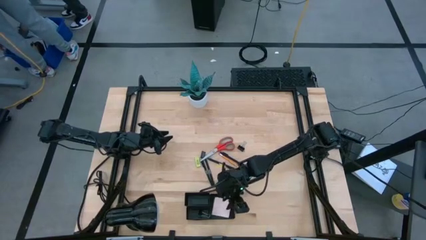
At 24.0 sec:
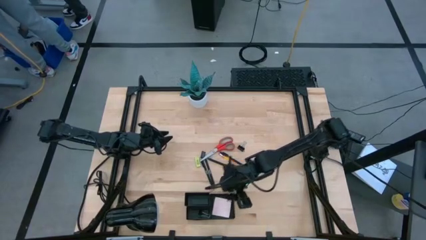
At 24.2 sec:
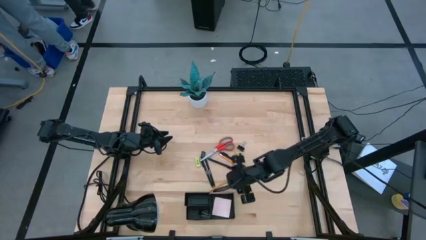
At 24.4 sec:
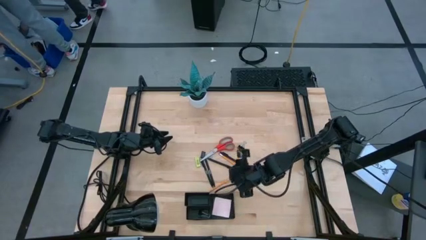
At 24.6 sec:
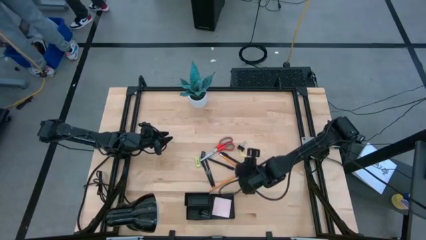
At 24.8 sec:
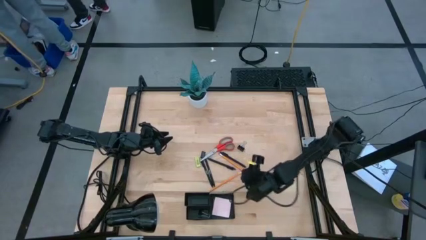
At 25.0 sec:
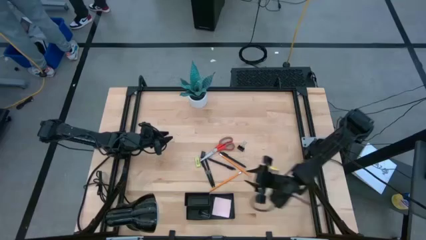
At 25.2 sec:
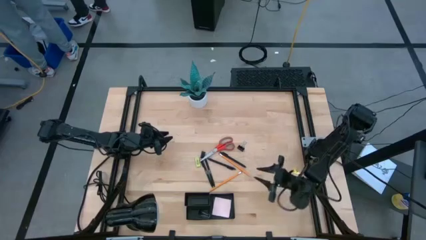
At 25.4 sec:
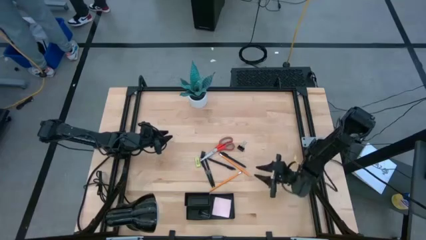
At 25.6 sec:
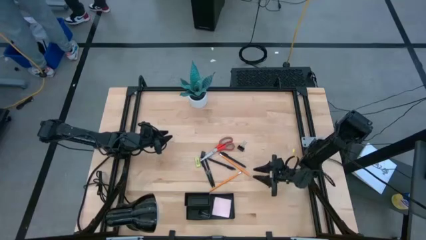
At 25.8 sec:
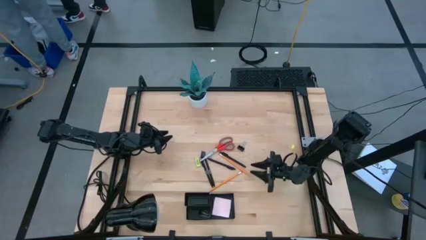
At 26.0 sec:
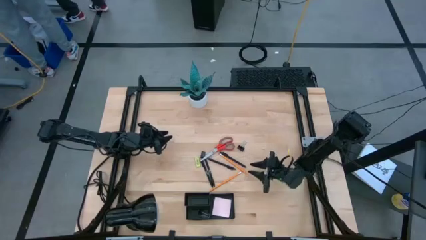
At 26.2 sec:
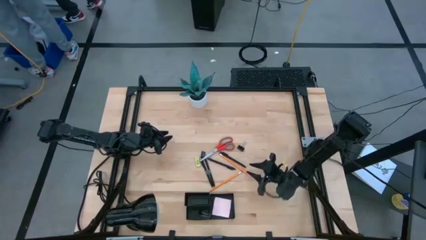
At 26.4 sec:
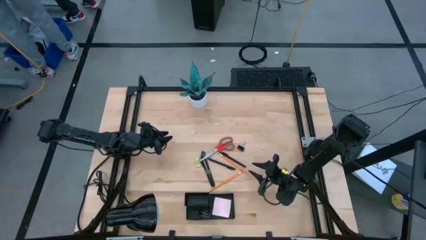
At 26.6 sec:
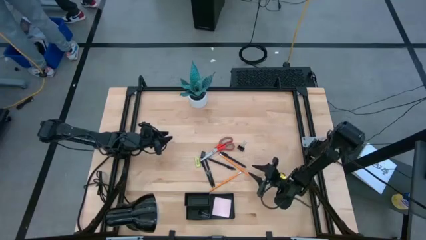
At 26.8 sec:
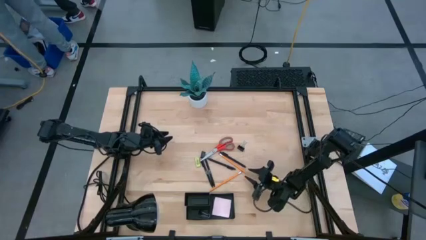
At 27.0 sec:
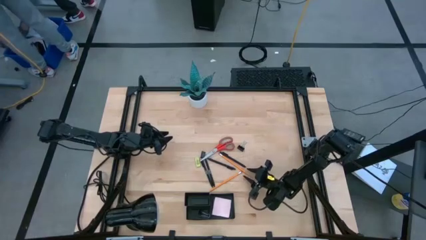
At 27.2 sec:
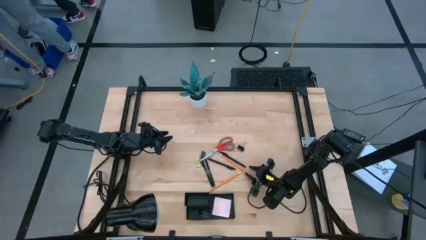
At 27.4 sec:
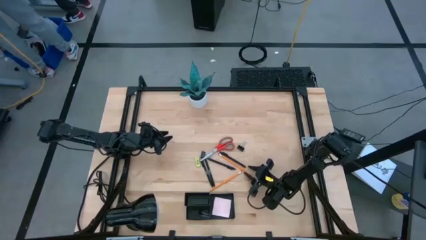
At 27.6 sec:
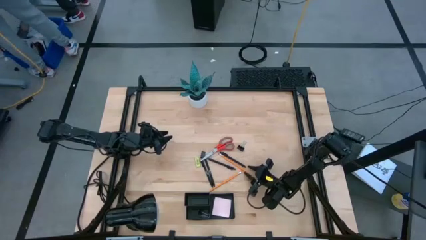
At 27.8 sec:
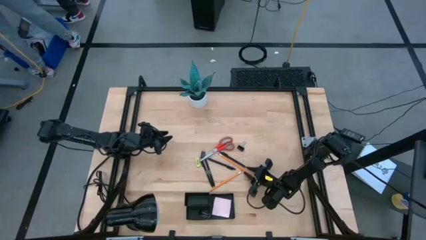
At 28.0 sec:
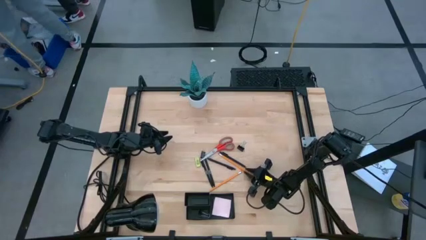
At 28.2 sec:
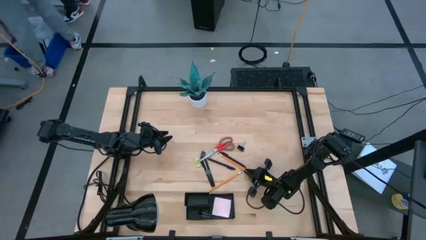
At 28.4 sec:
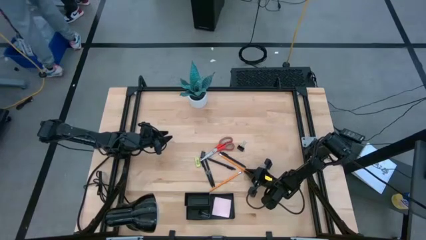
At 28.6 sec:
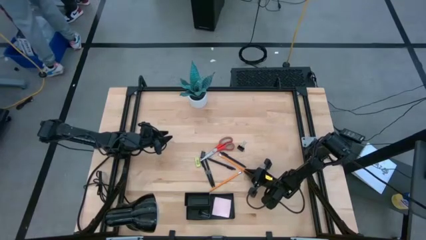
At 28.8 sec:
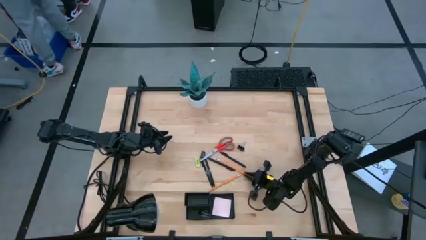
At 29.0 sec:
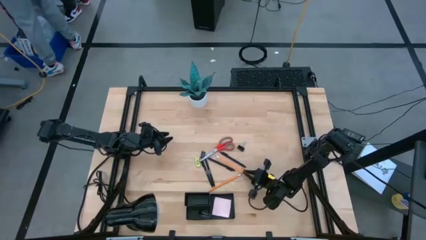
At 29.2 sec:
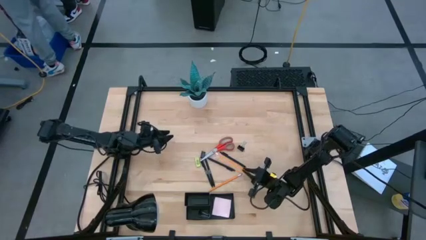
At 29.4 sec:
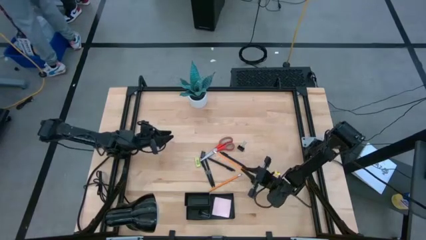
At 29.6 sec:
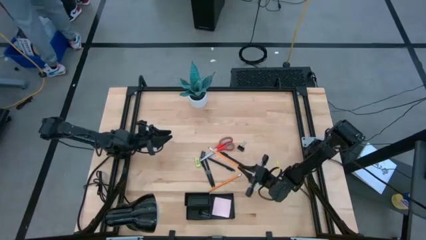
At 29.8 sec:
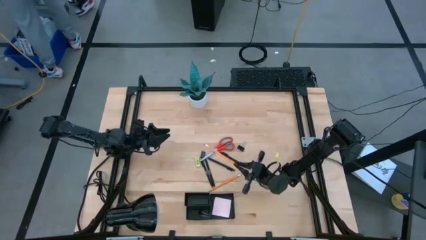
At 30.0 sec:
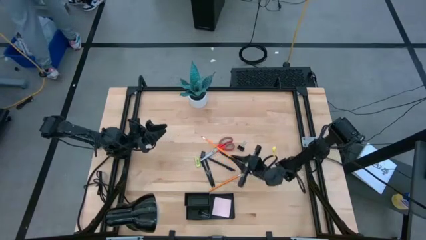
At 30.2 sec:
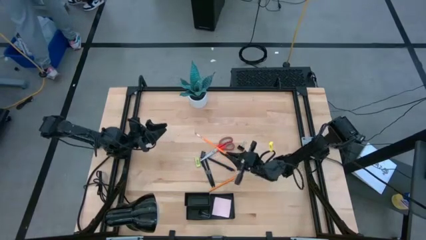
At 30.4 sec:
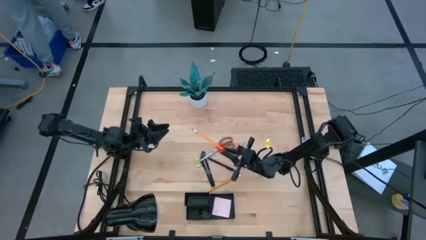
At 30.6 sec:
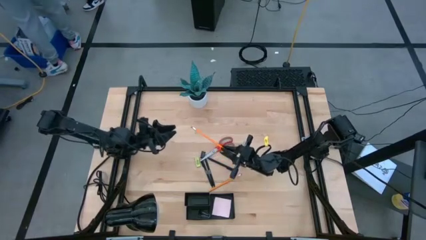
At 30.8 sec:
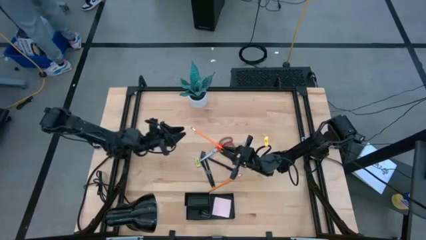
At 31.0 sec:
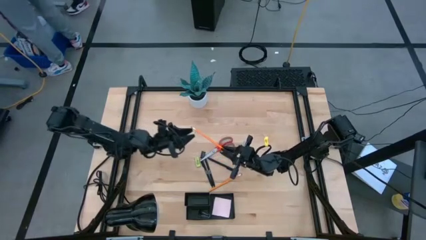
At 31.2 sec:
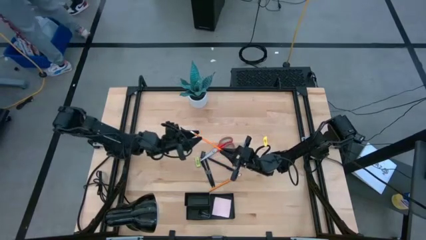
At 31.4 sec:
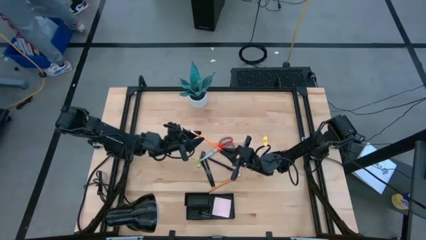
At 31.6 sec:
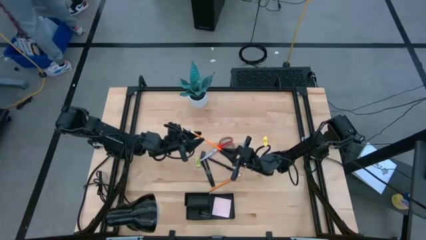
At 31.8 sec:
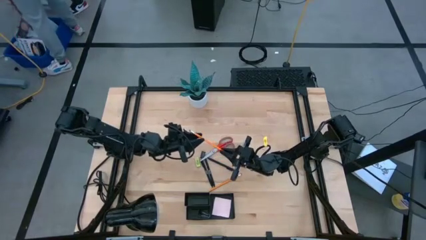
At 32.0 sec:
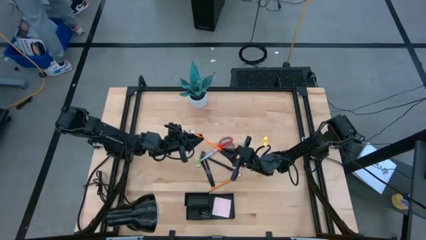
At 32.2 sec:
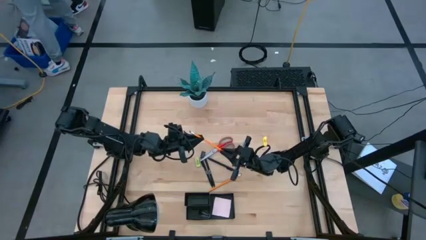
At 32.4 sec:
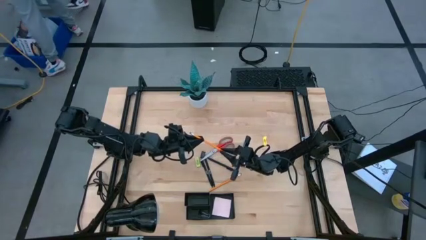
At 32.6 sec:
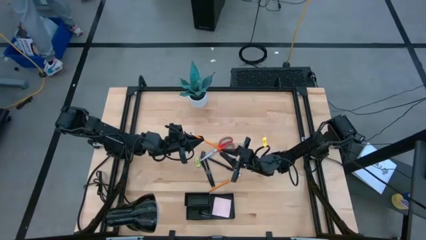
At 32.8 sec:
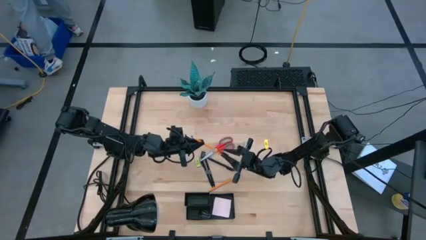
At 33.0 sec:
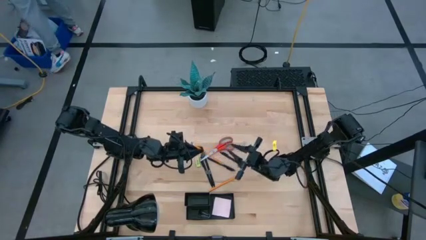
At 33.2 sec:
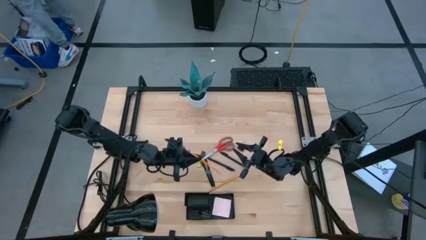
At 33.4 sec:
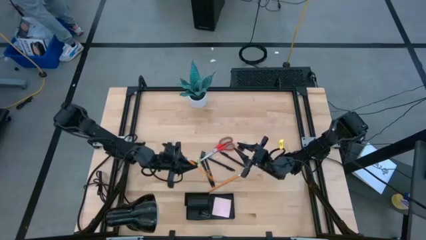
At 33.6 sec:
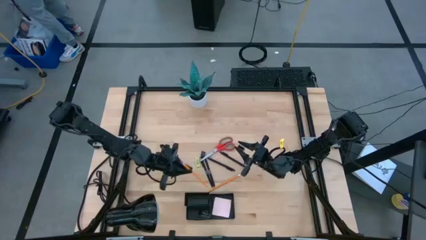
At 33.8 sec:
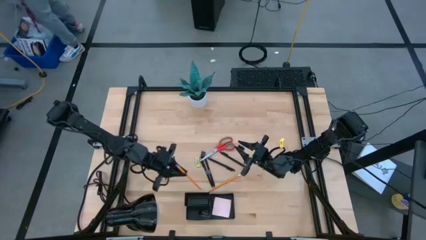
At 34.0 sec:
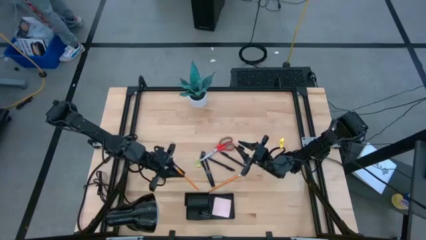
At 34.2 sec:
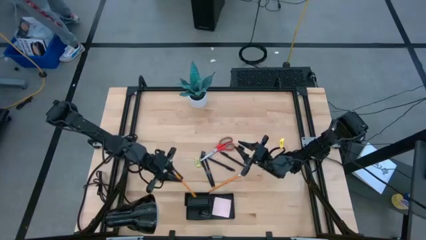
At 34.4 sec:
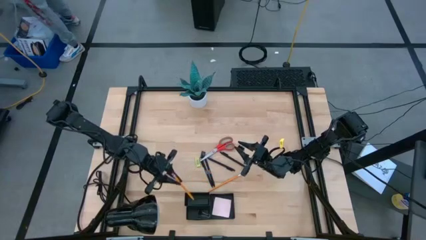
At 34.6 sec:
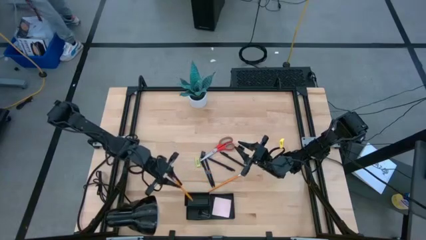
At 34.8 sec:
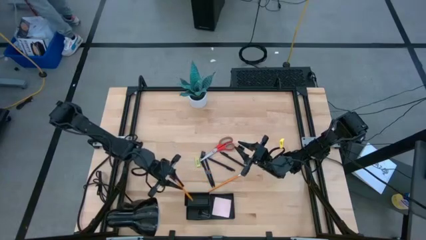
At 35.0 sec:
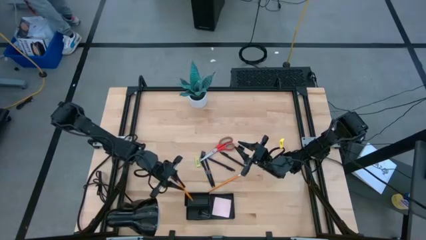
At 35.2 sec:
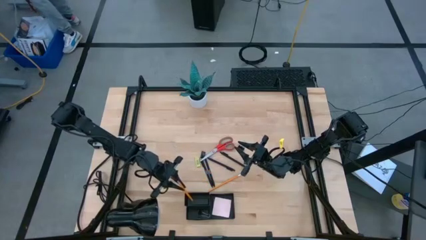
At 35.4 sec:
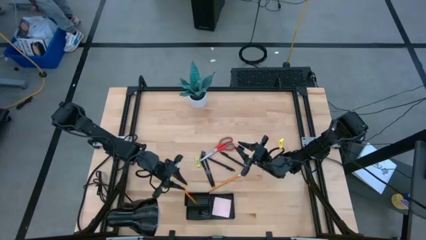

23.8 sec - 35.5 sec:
Task: Pick and place office supplies into organizer
Put the yellow pencil into the black desk organizer

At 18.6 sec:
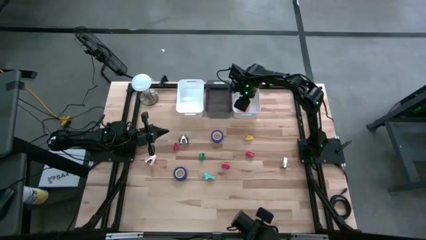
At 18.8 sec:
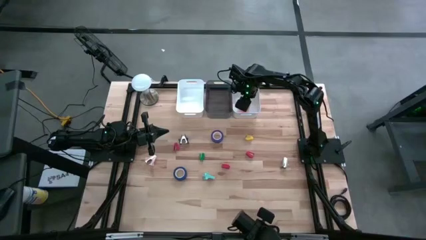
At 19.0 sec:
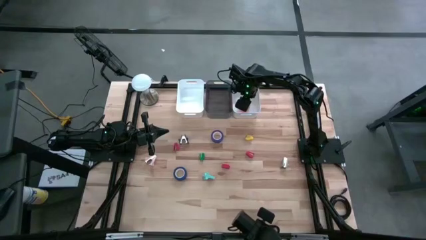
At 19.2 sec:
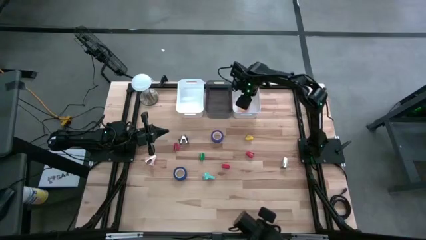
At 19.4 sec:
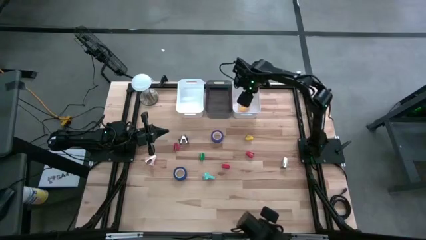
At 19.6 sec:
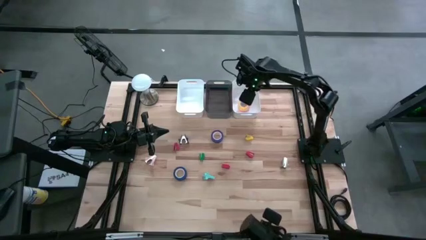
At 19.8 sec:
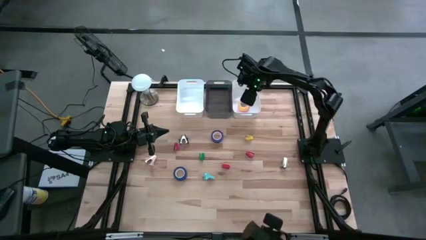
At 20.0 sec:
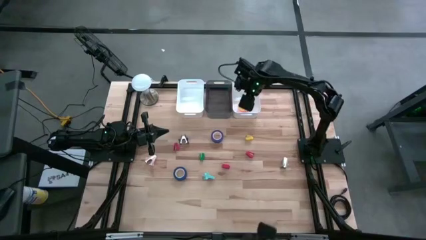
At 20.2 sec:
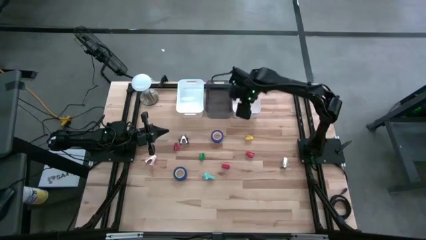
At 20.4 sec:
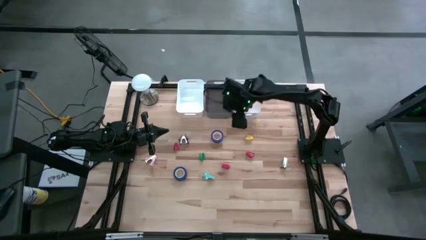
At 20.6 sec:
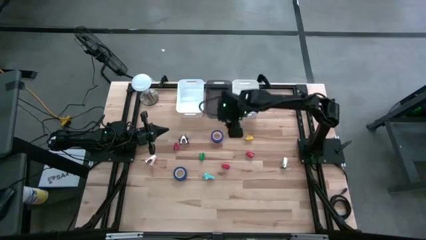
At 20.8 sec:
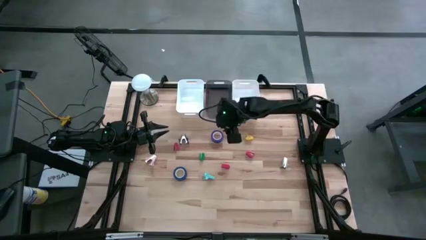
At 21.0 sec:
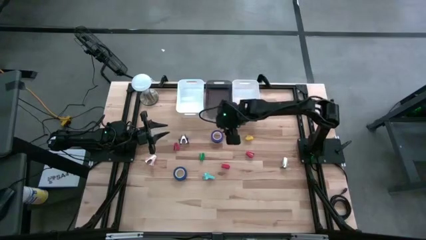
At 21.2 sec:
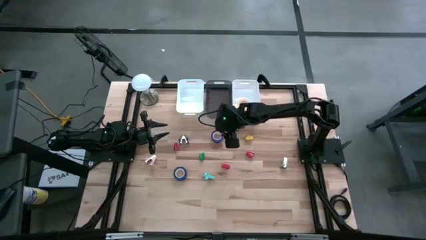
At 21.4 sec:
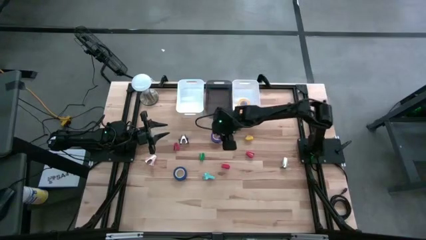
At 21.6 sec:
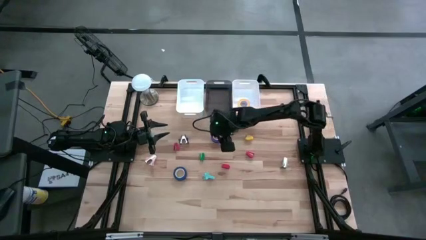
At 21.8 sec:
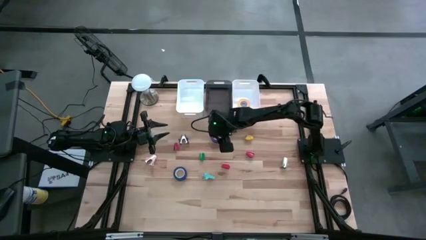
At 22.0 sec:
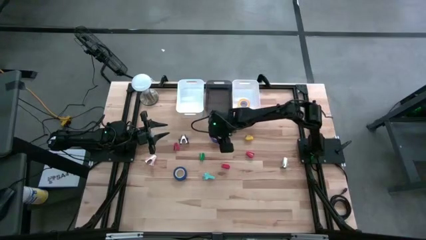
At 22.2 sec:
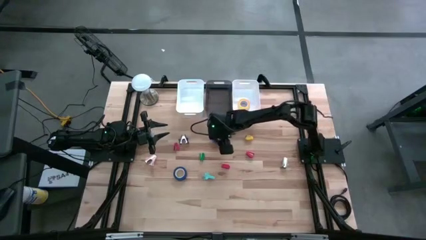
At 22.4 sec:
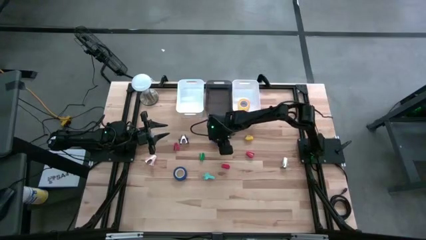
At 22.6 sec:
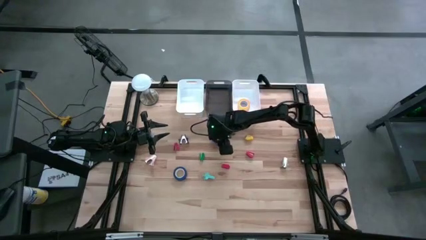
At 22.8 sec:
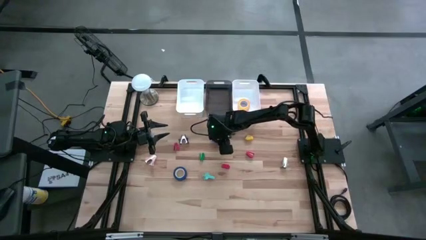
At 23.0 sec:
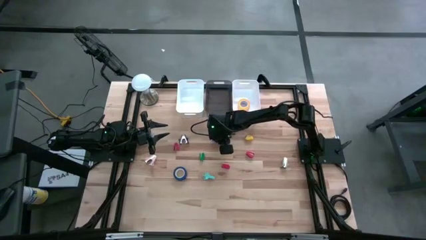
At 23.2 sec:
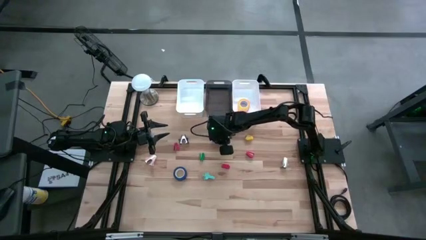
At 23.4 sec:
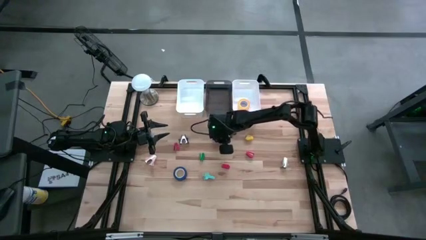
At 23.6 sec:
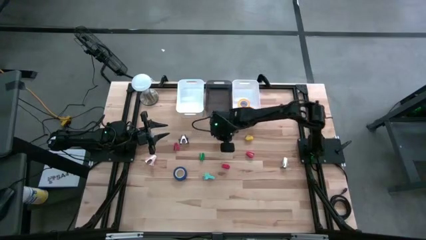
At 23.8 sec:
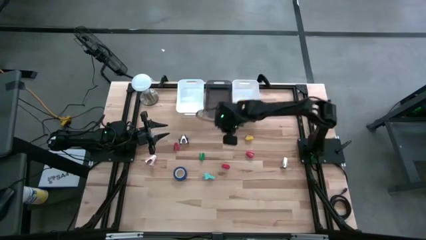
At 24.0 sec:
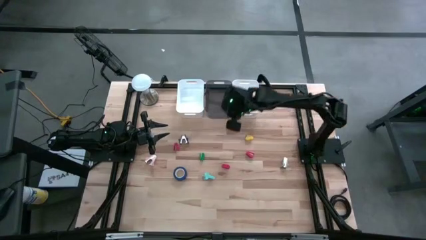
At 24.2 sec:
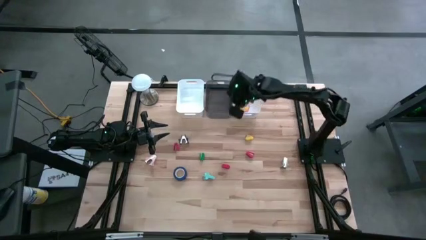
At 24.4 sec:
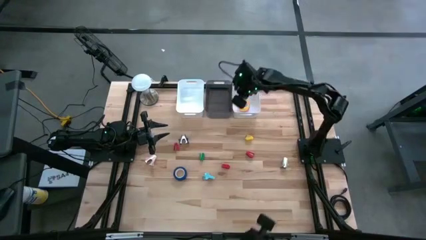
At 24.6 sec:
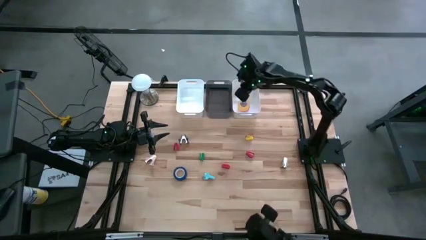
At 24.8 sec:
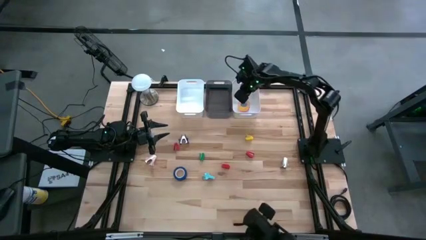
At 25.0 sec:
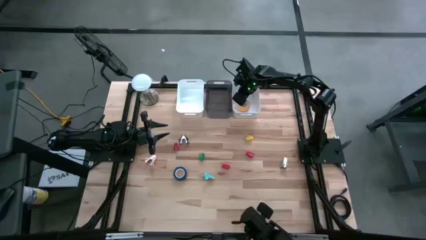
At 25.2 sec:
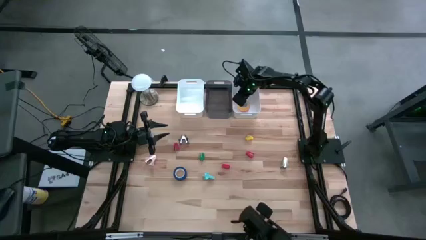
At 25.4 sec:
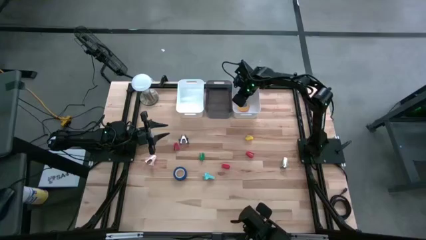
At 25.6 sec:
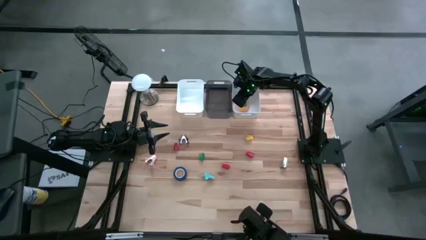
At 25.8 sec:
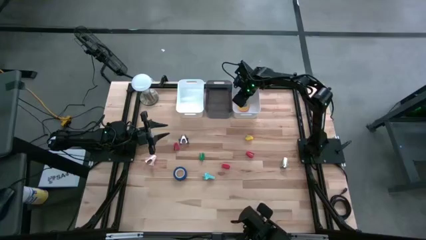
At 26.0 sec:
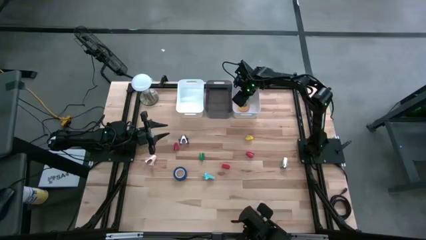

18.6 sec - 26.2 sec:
Task: Pick and place Stapler, Stapler remover, tape
Put the dark blue tape into the right white bin
